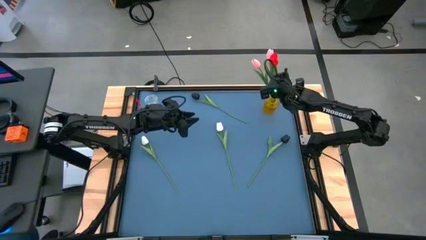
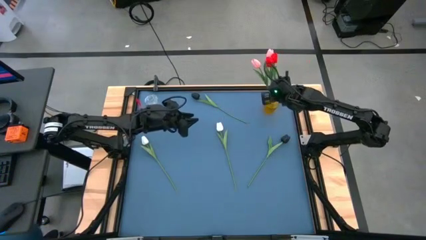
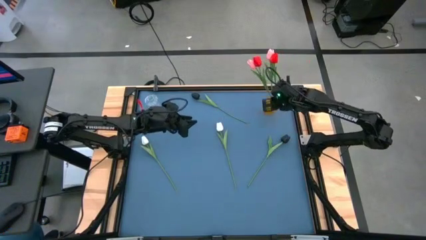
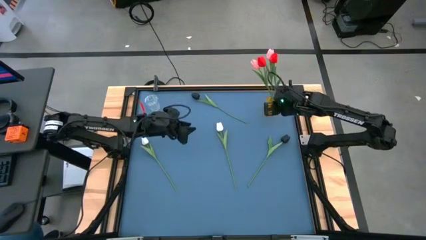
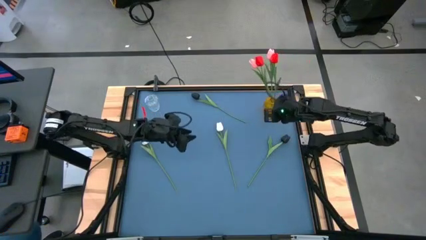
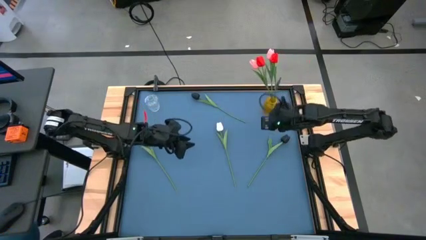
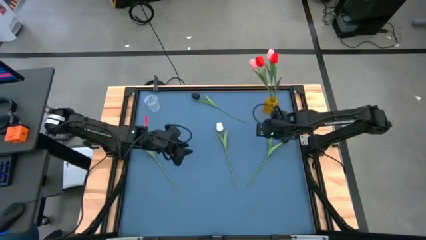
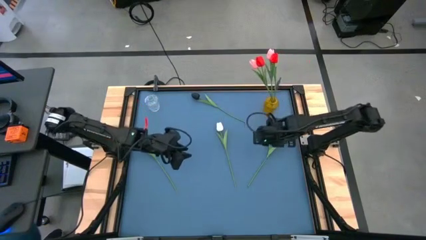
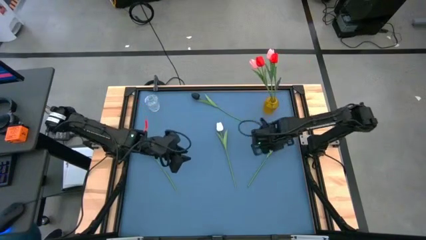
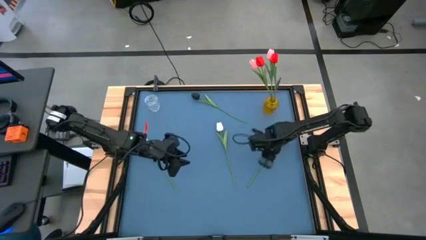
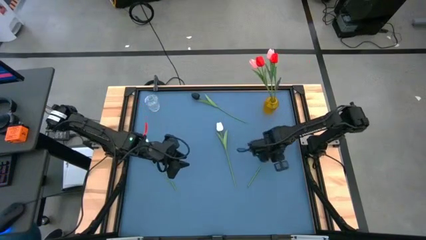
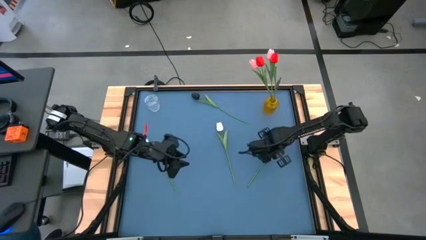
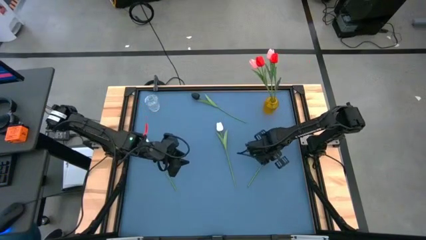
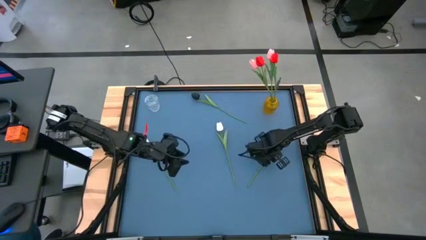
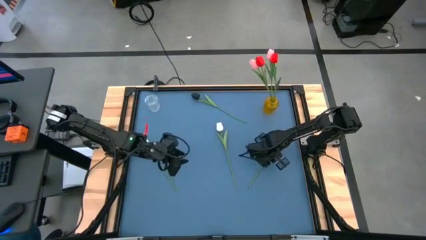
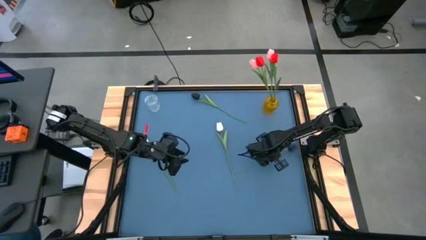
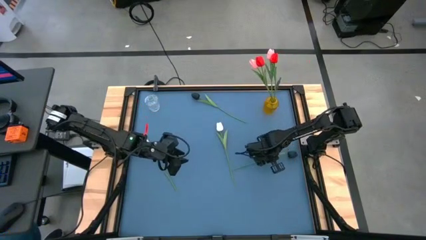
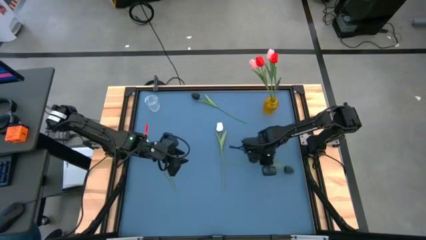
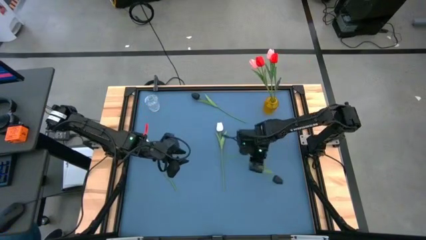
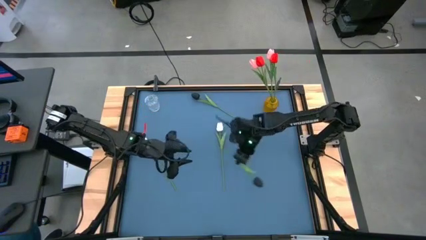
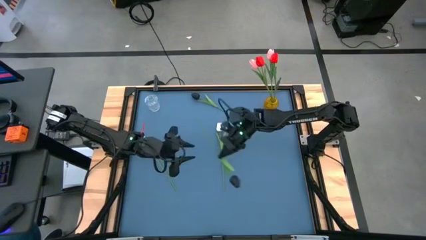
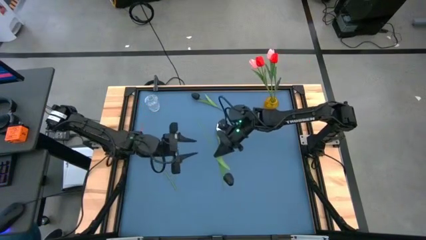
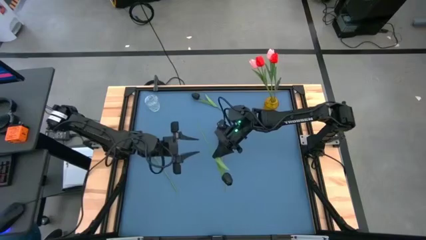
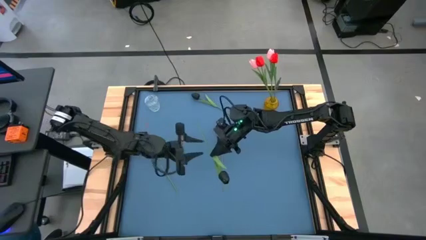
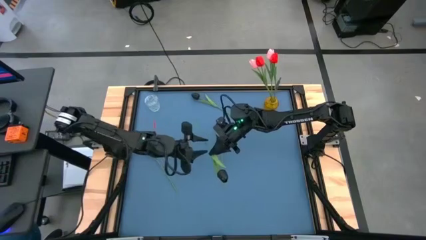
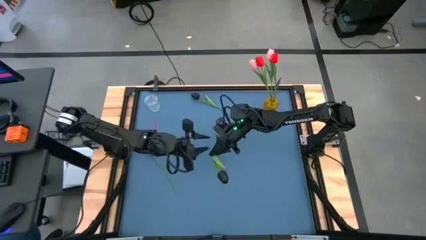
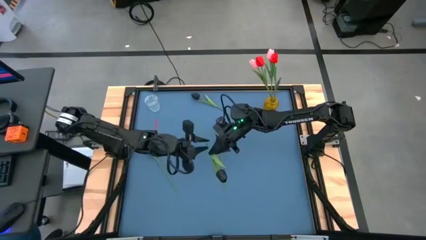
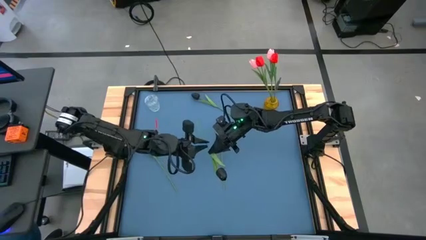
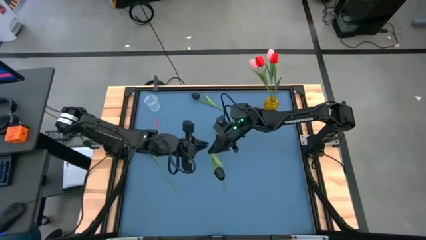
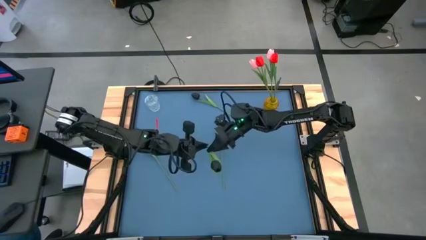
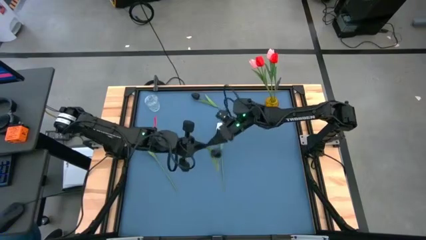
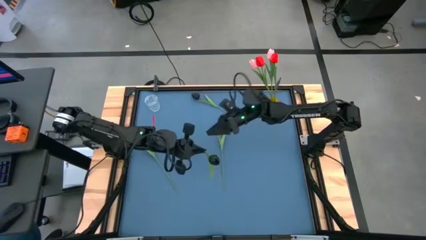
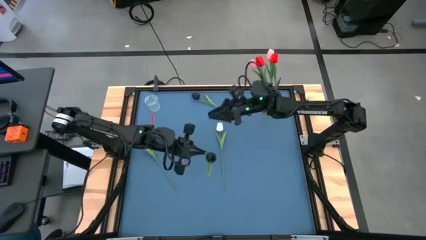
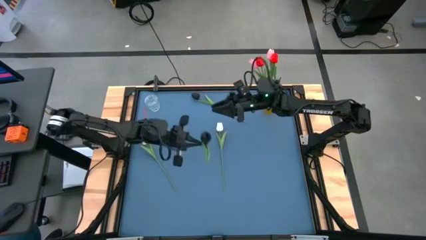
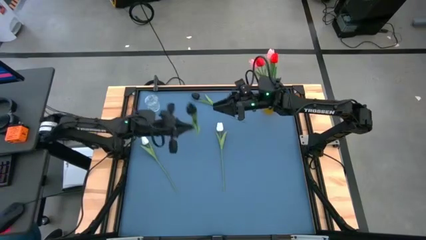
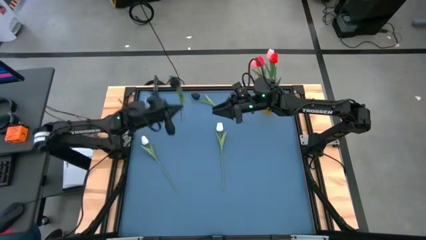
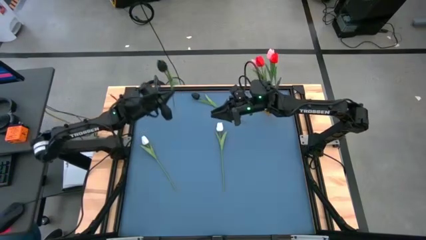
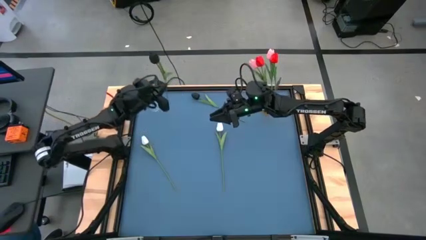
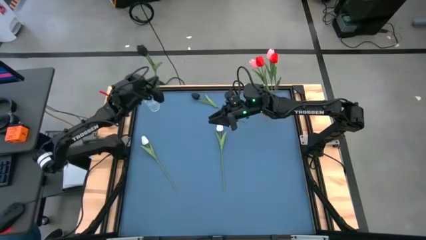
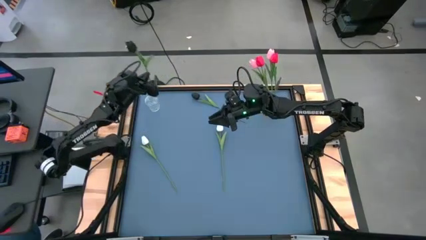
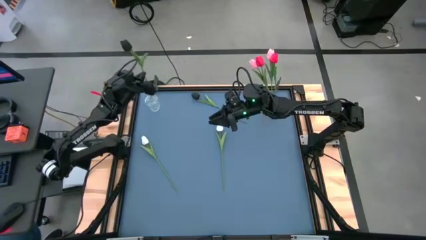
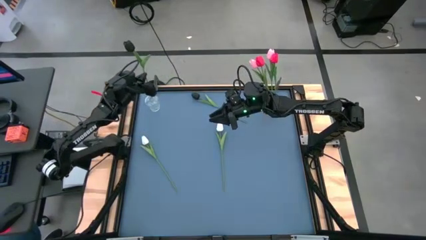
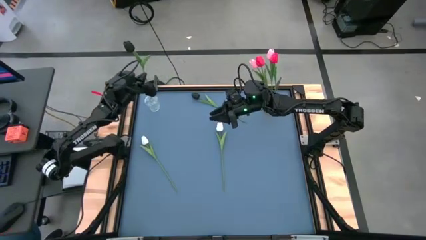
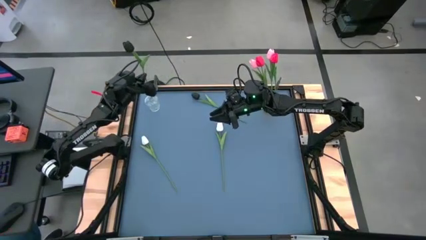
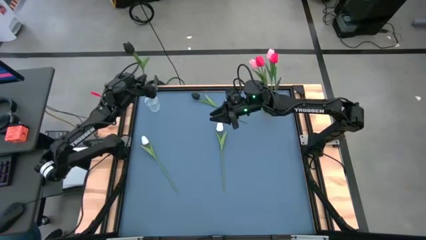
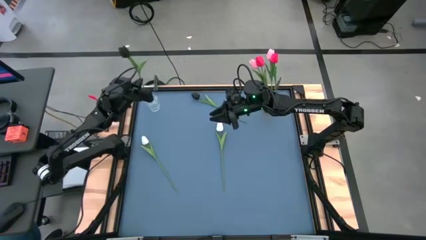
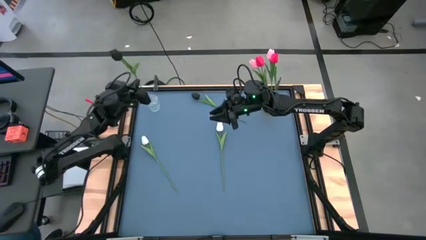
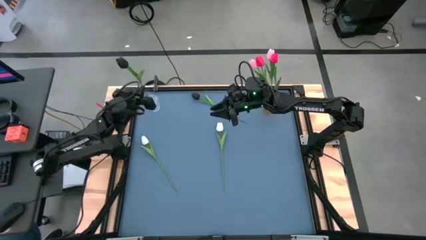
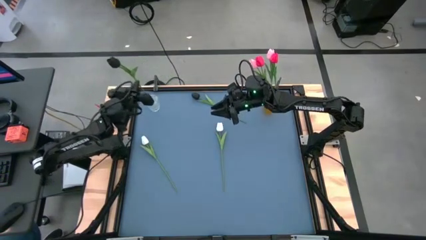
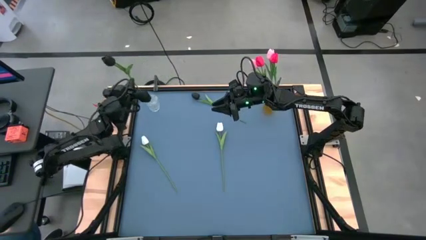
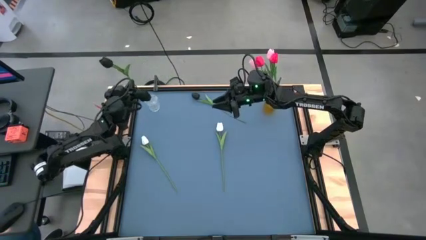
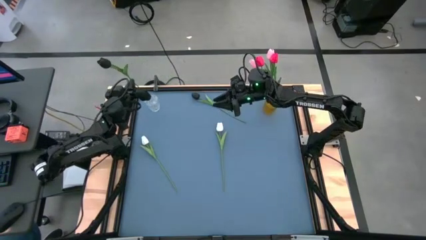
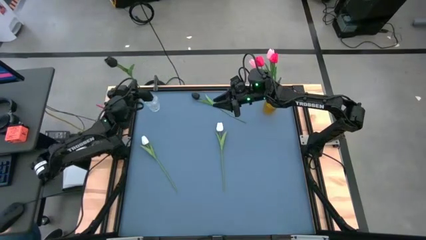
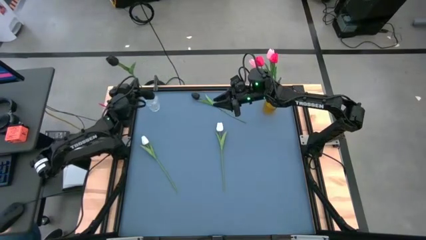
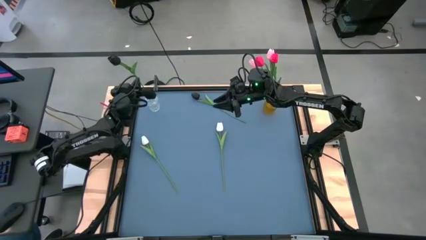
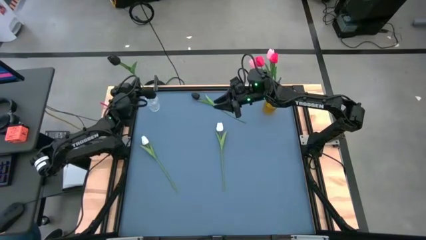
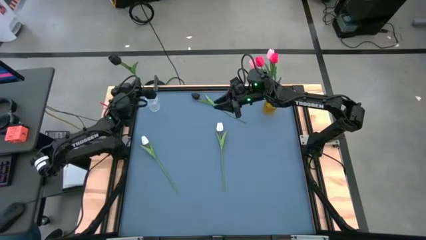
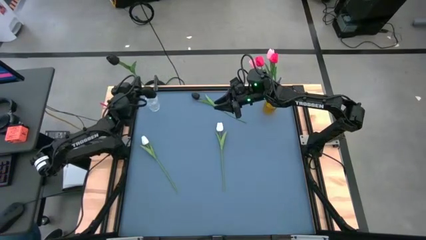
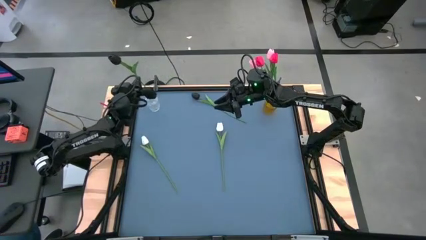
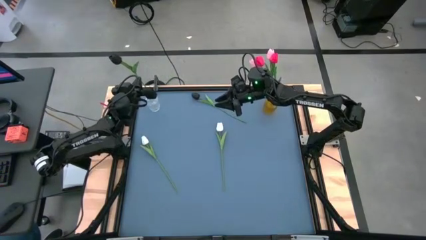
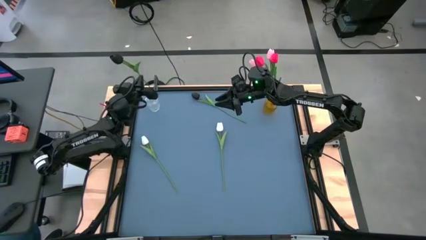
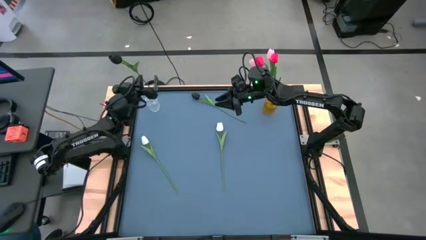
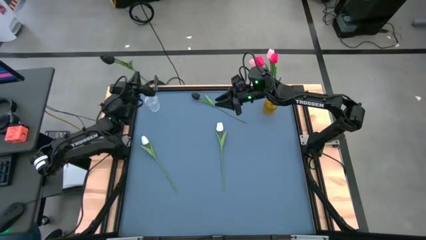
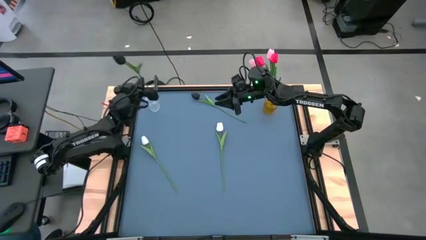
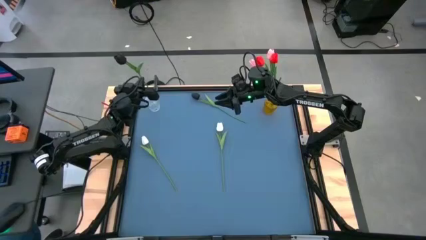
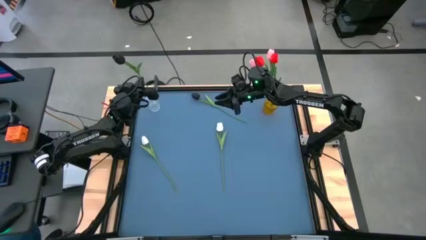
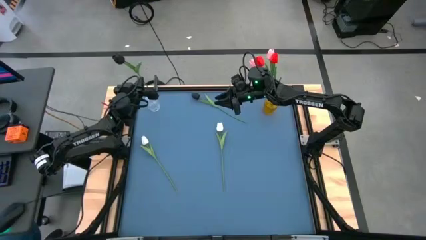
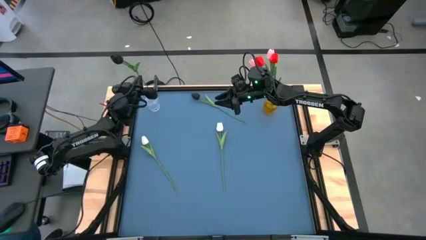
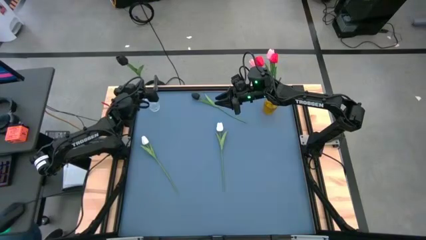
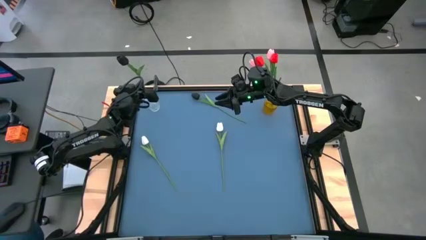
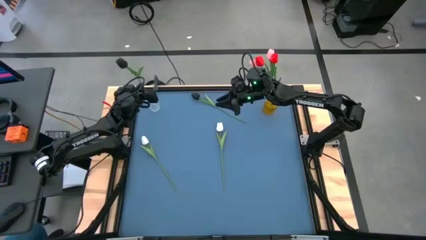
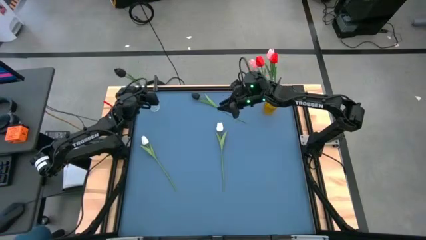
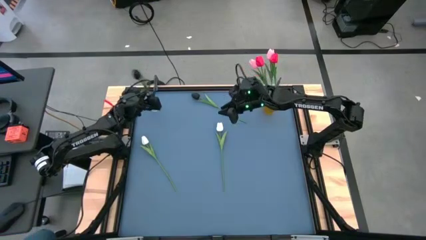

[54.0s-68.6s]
Task: Sort flowers into vase by color
Put the bottom black flower into the transparent vase

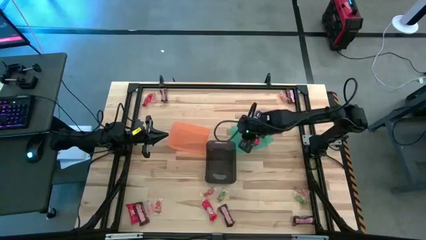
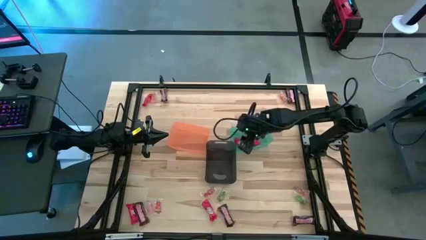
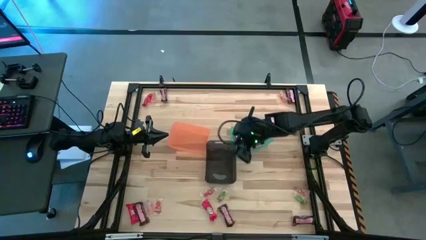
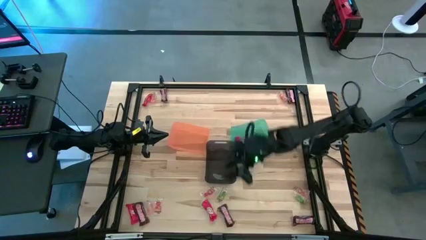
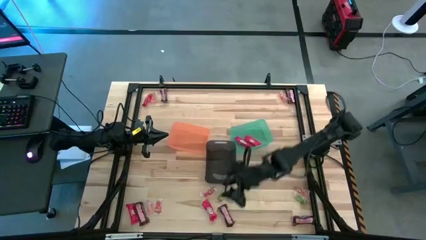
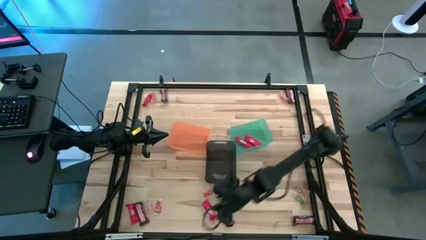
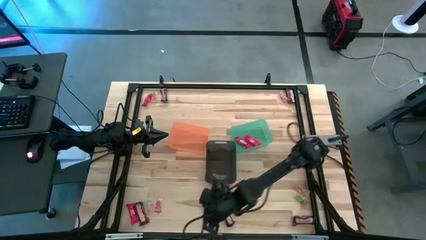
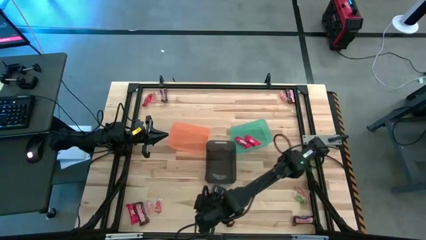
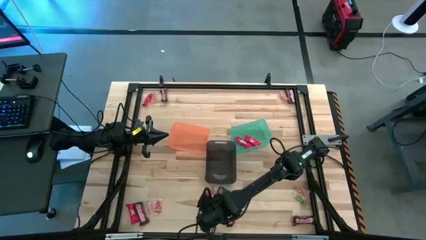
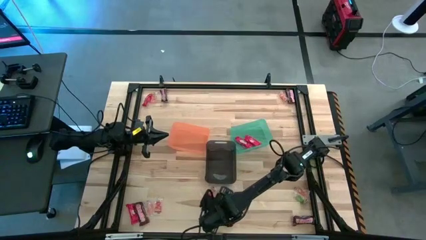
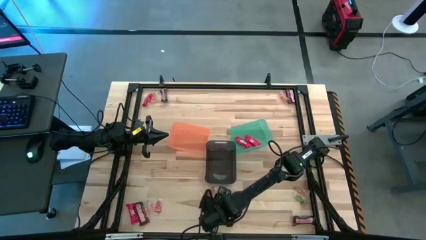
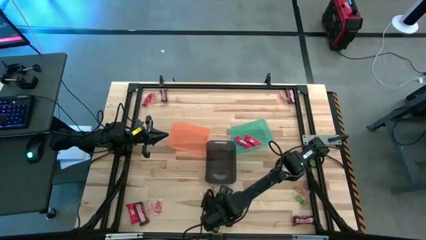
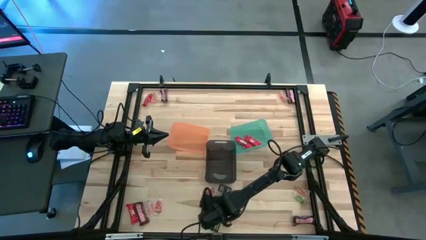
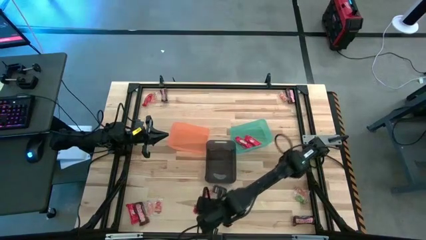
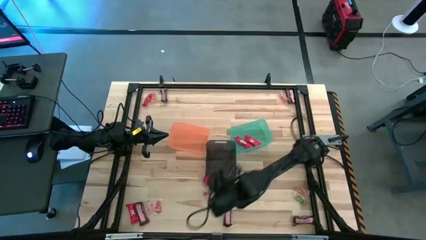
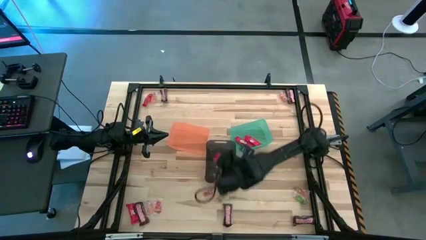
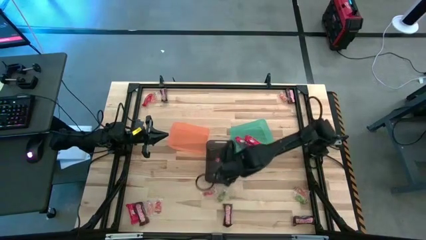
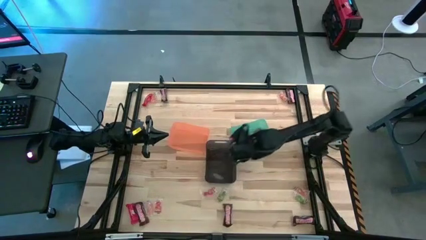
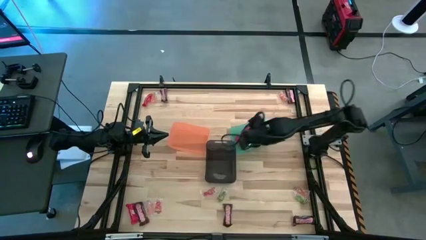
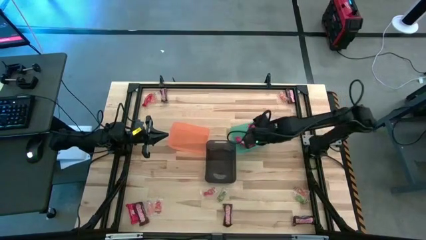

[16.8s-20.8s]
Task: Sort candy by brand, put in halloween buckets
Put the red chocolate bar into the green bin
